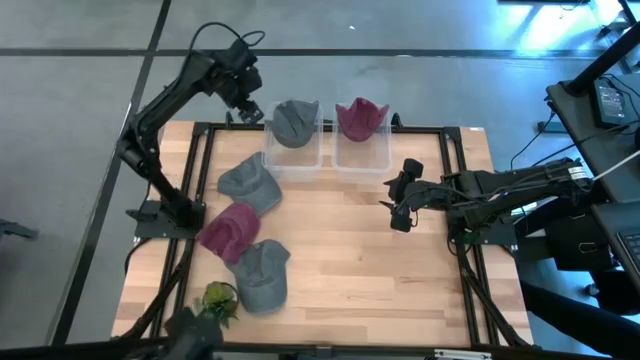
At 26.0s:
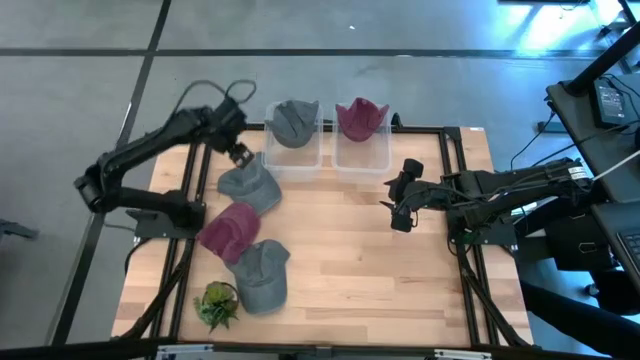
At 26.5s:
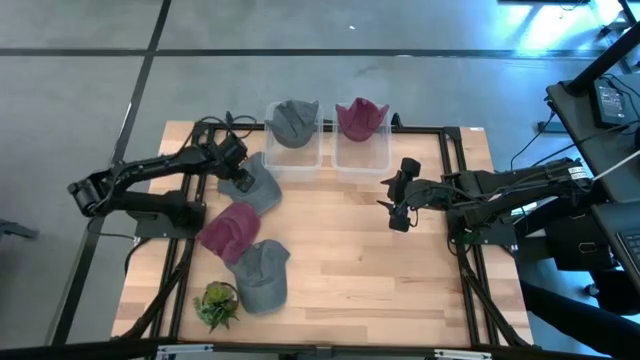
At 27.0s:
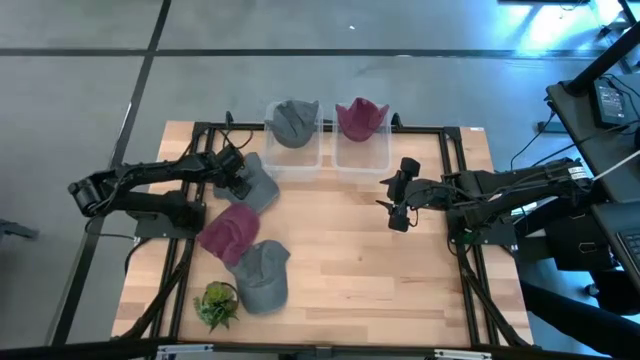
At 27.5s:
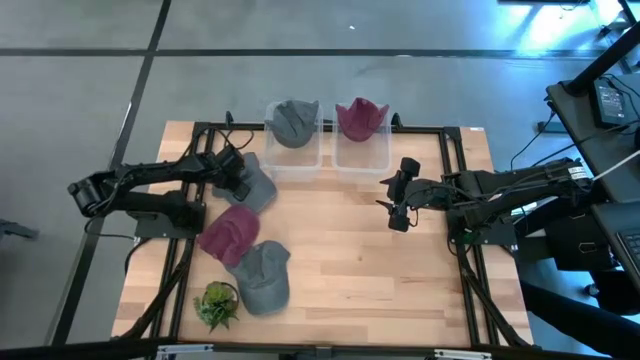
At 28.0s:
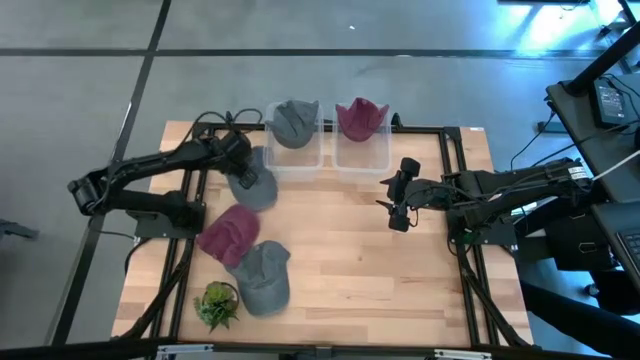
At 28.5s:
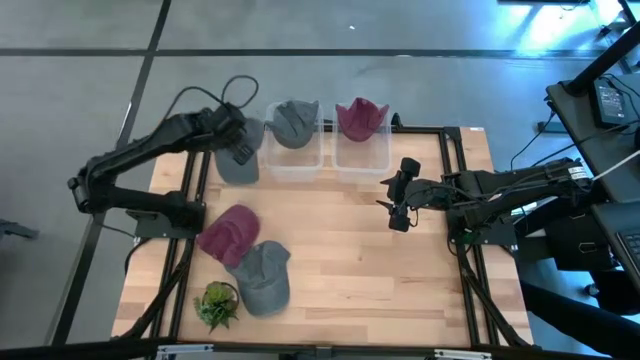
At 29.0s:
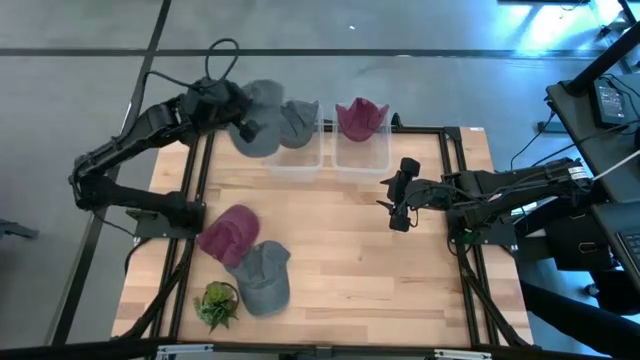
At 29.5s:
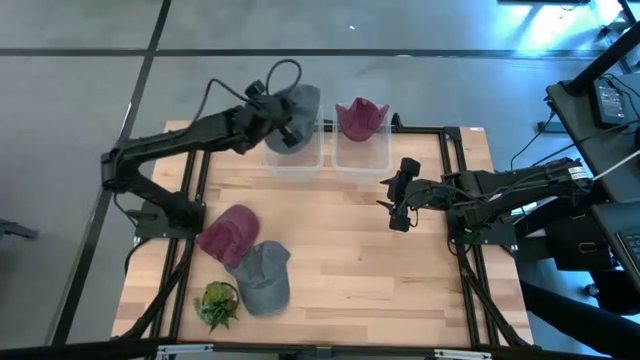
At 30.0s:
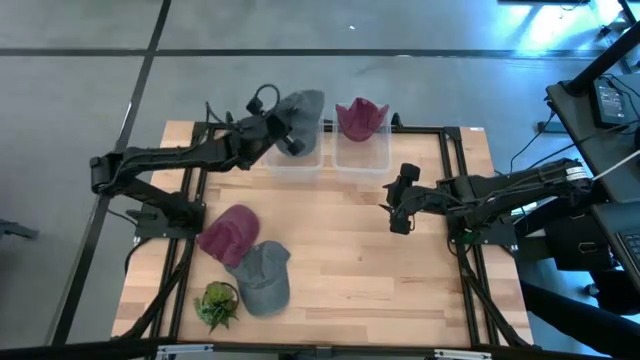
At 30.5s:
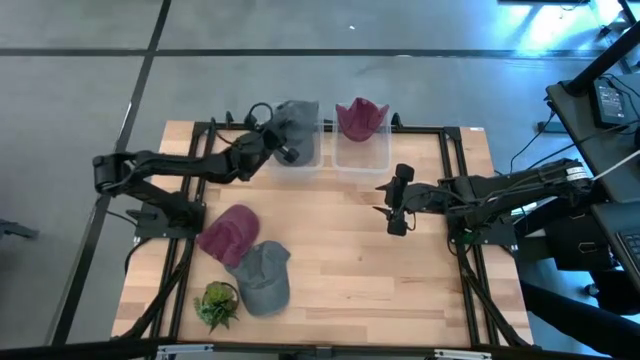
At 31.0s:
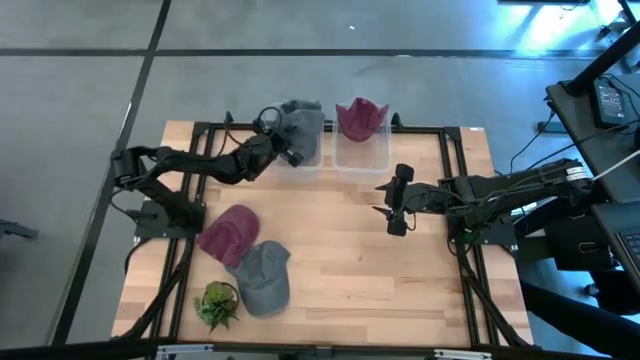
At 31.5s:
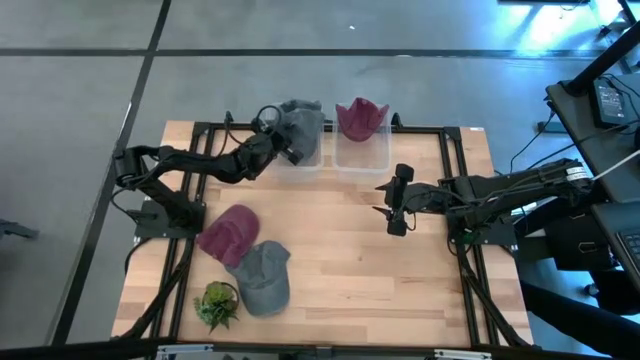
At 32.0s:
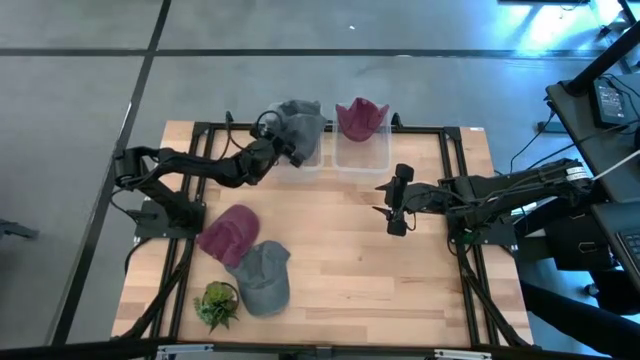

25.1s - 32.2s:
Task: Pick & Place hat
Put the top gray cap into the left transparent bin

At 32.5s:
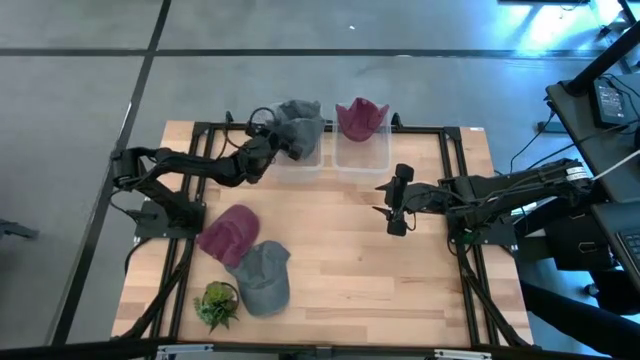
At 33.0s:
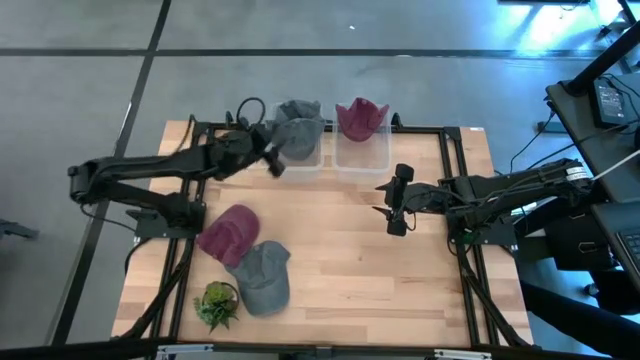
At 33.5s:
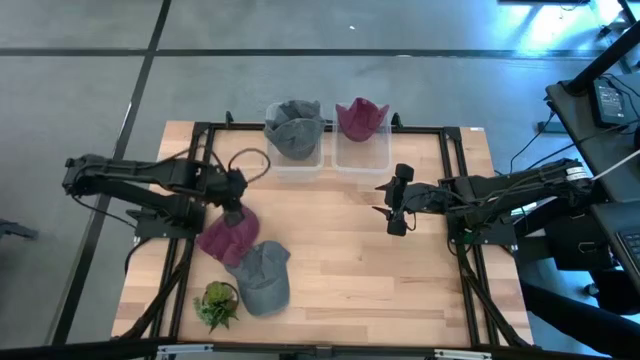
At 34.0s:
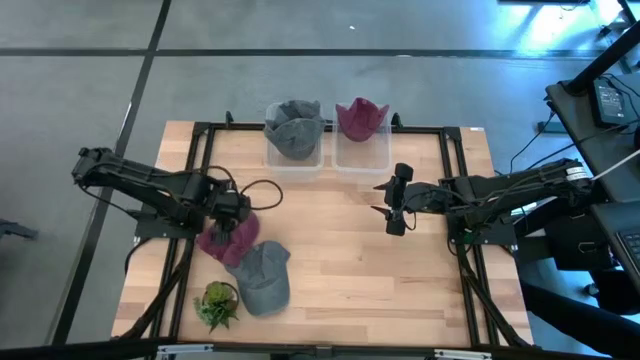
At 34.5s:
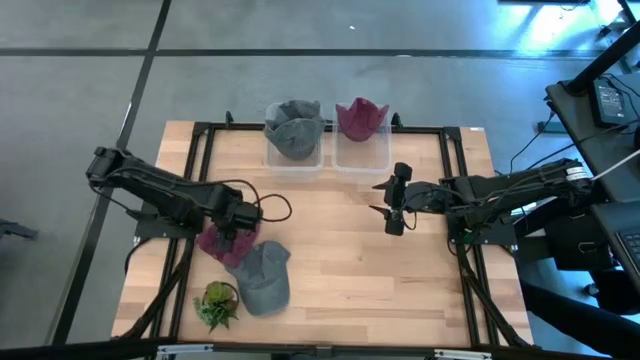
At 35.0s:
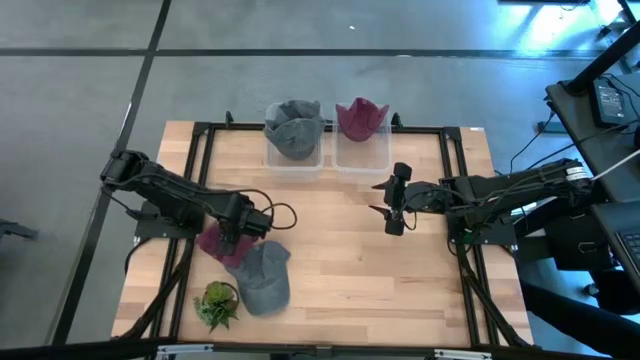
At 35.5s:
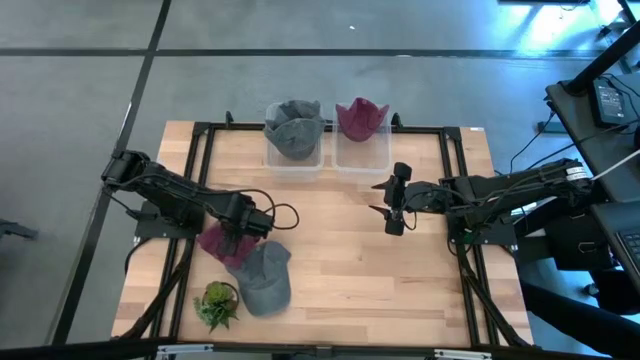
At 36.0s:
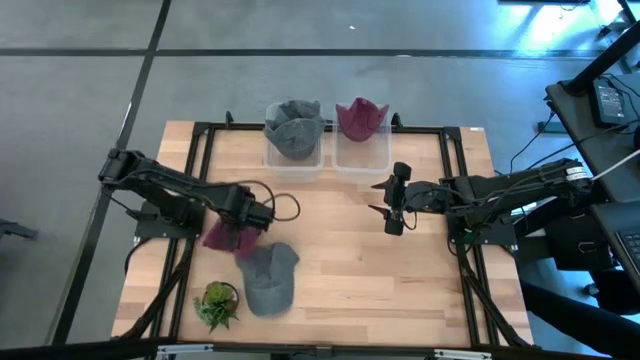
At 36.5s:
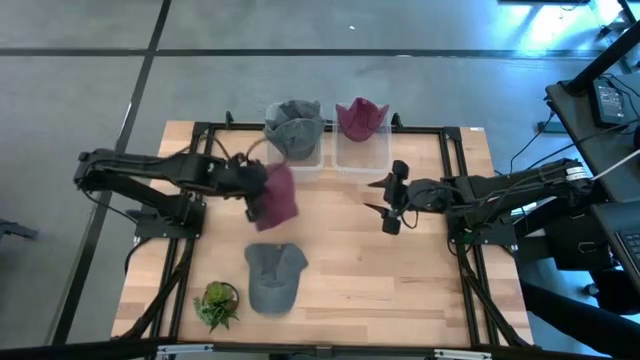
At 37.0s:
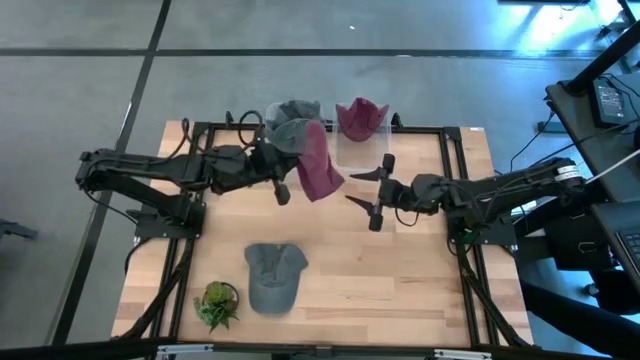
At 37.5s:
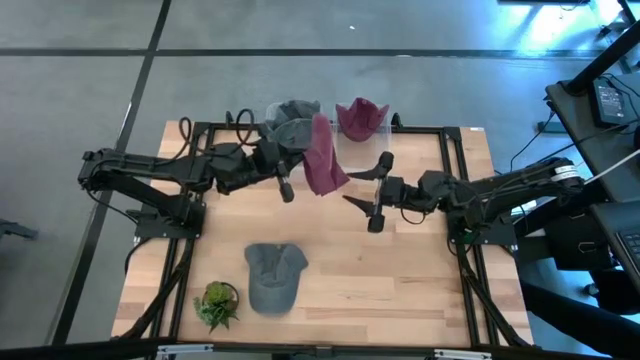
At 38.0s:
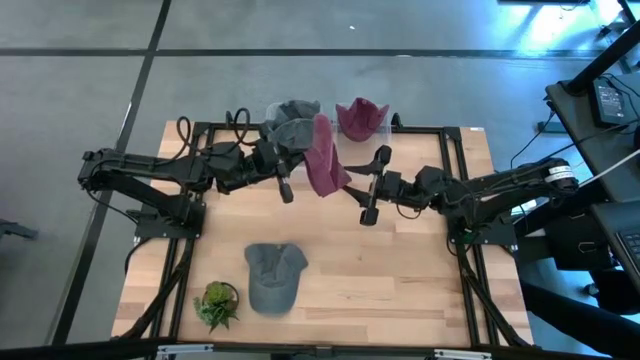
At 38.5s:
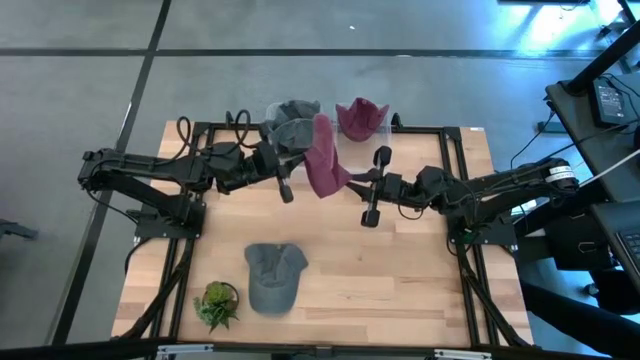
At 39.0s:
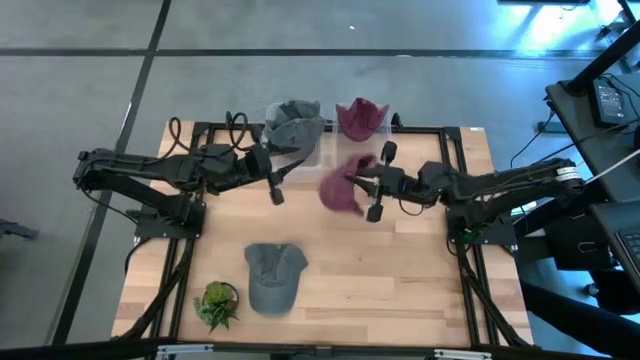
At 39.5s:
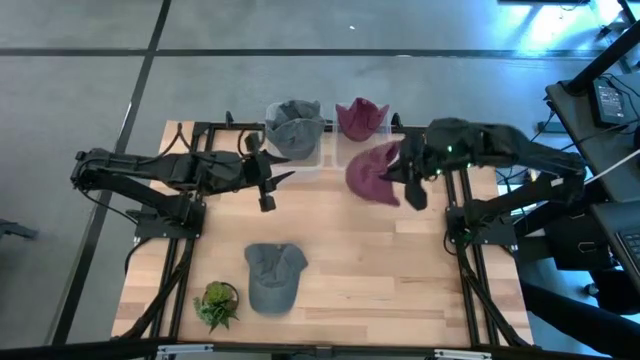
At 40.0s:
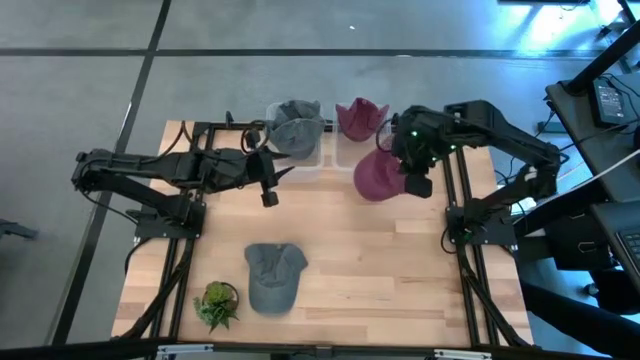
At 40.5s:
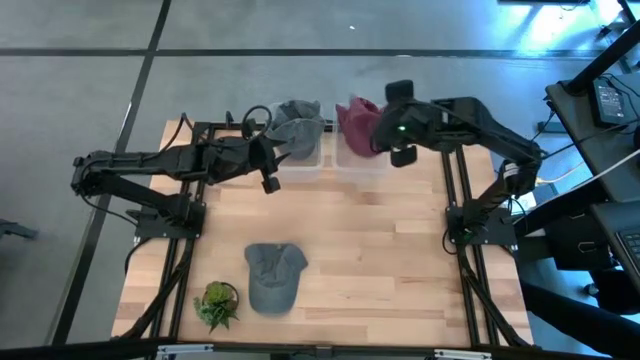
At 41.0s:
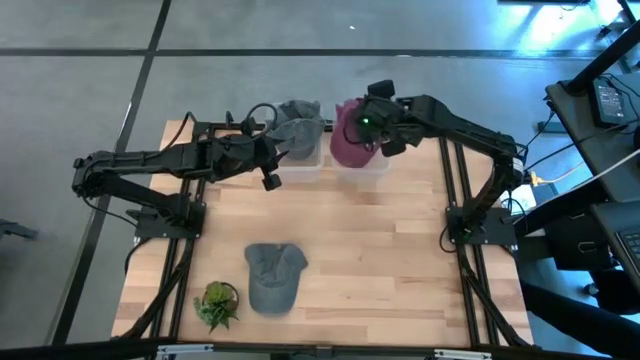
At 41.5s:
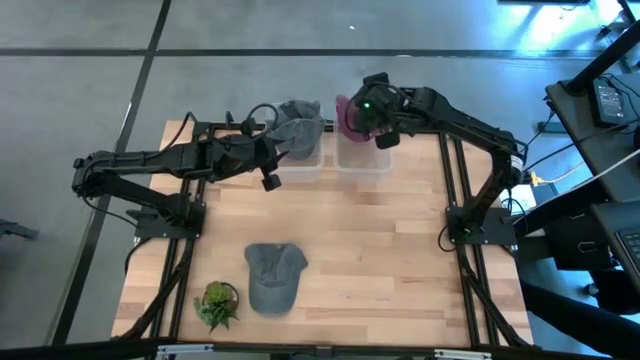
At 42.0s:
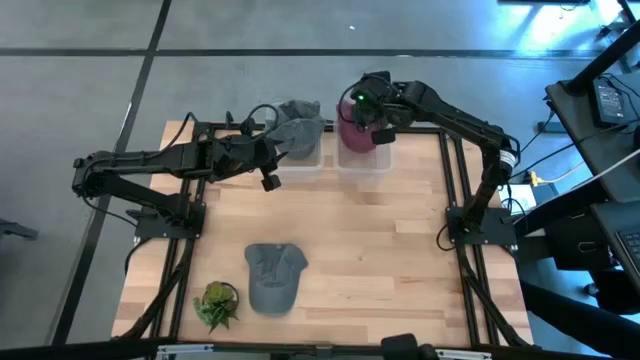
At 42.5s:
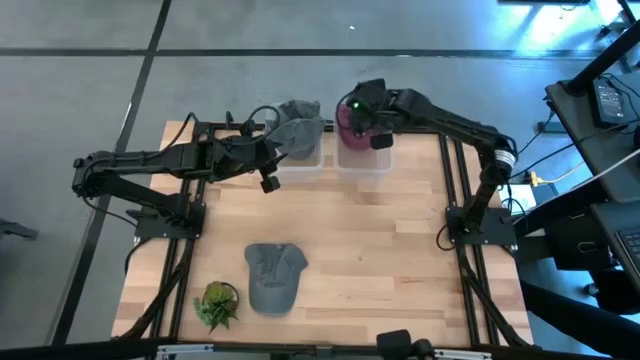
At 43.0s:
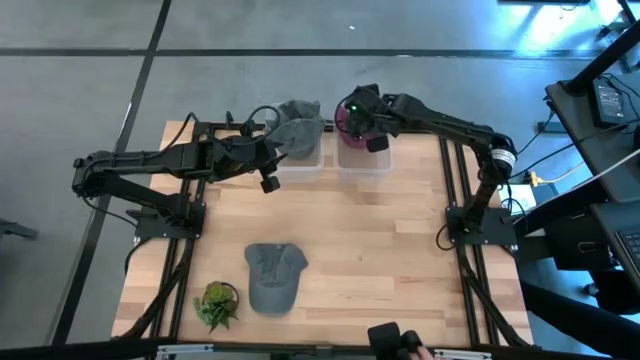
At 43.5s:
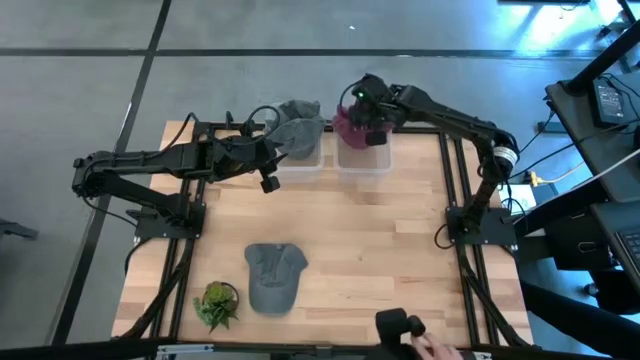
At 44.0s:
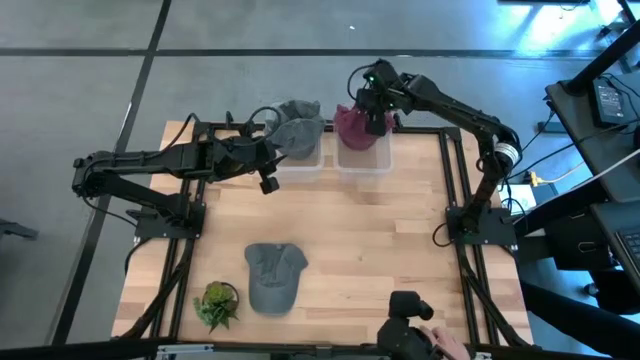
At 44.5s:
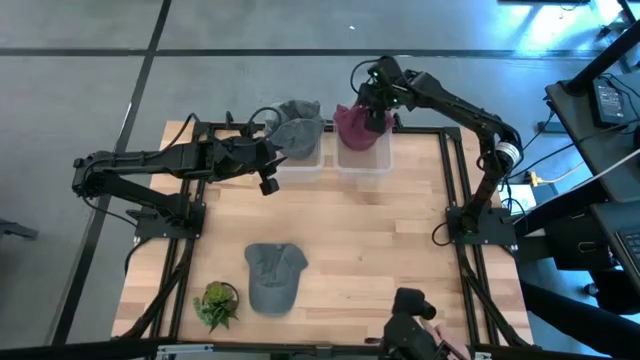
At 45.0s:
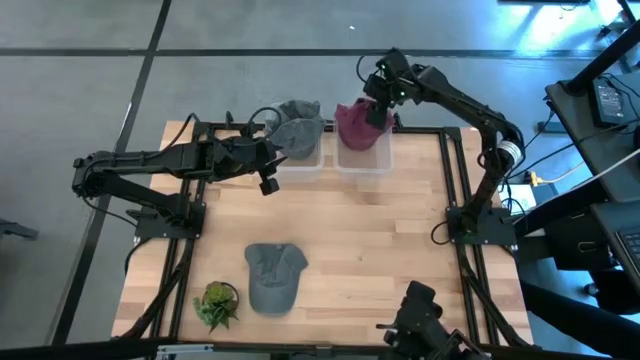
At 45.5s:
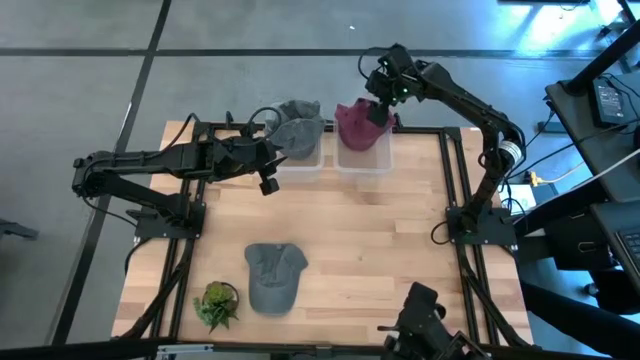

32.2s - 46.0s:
Put the red cap into the right transparent bin
